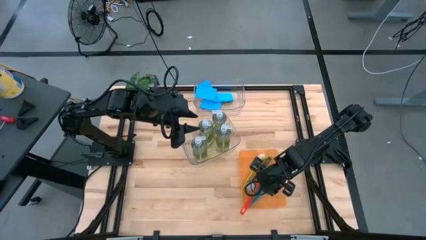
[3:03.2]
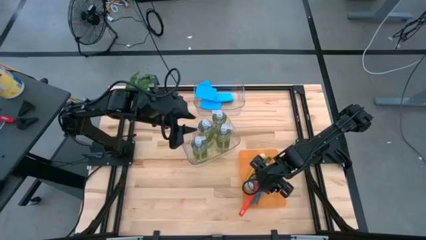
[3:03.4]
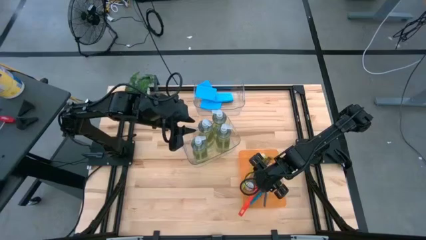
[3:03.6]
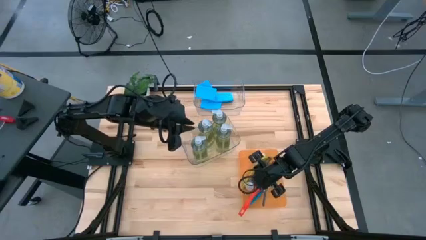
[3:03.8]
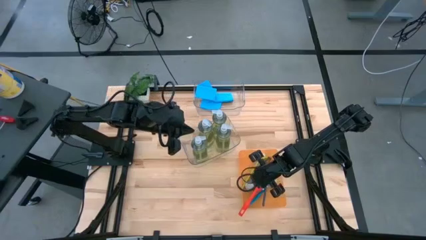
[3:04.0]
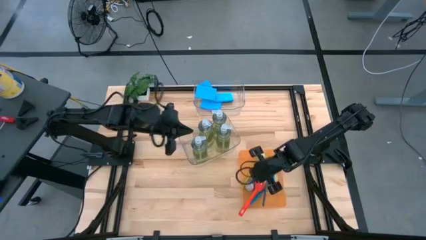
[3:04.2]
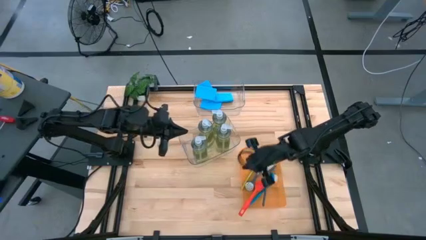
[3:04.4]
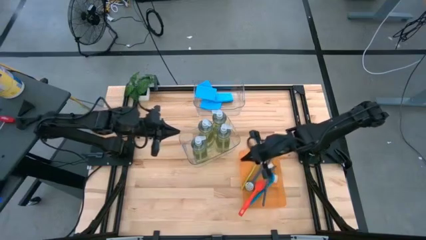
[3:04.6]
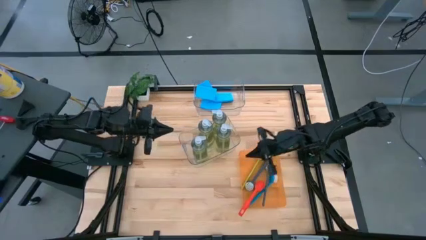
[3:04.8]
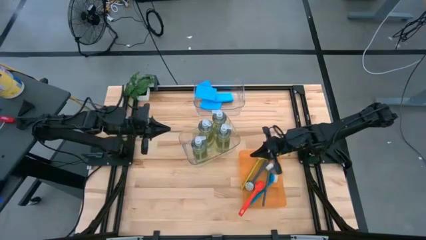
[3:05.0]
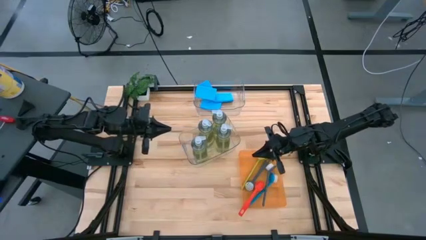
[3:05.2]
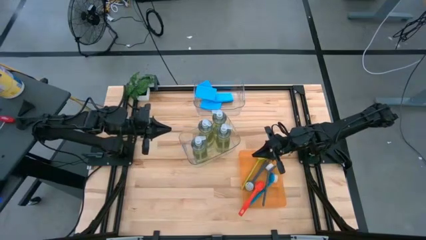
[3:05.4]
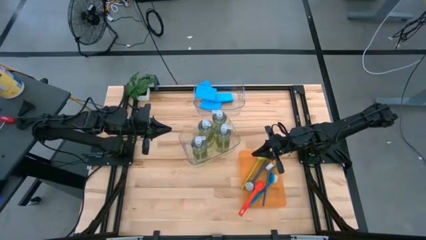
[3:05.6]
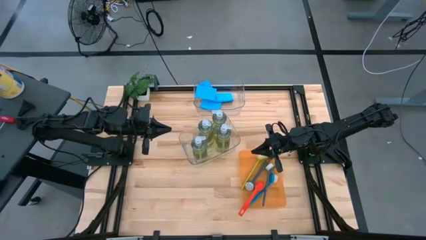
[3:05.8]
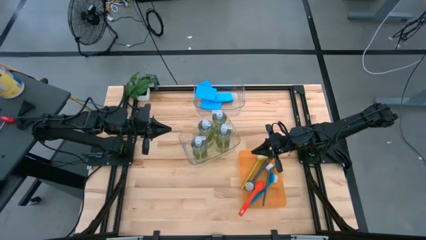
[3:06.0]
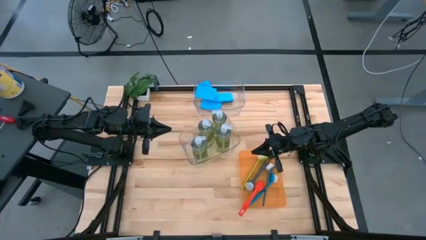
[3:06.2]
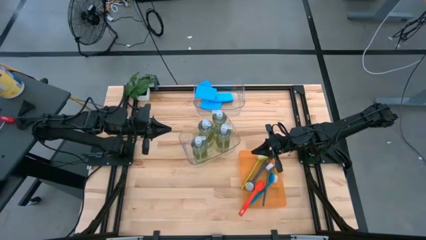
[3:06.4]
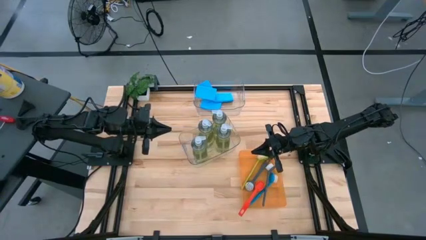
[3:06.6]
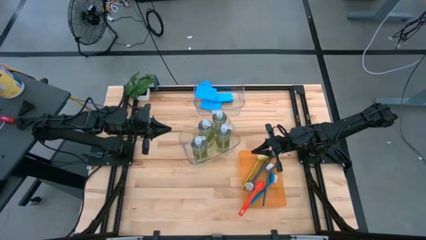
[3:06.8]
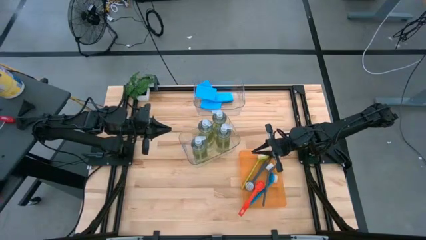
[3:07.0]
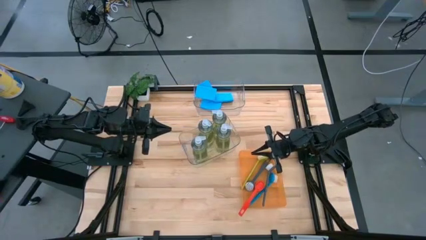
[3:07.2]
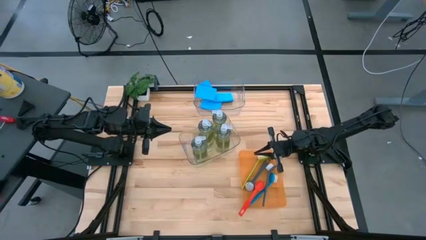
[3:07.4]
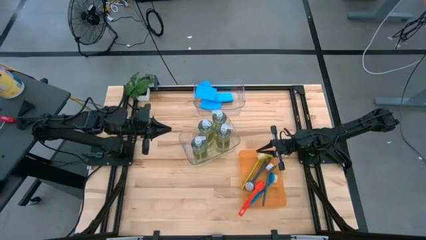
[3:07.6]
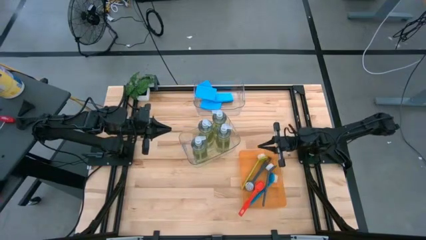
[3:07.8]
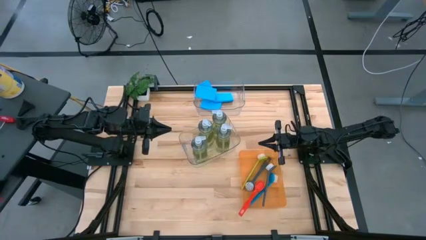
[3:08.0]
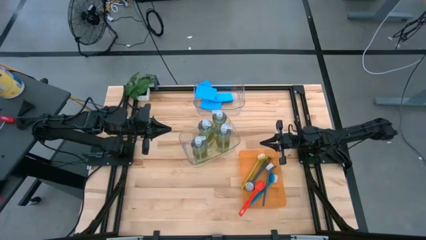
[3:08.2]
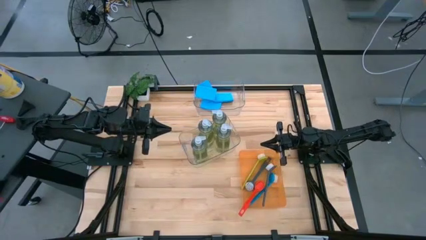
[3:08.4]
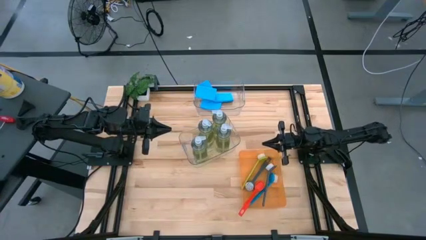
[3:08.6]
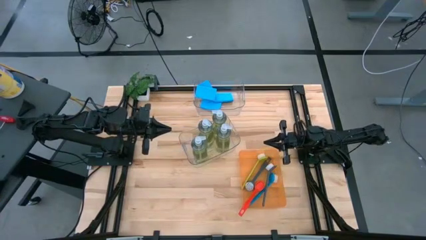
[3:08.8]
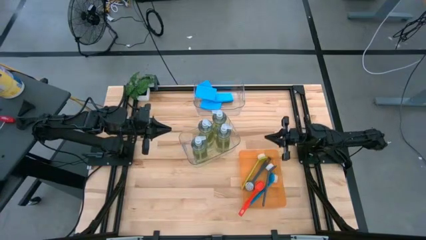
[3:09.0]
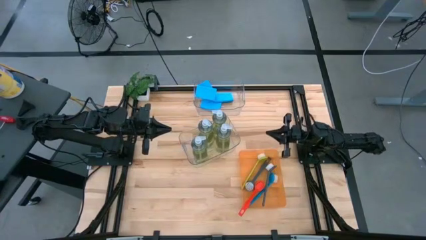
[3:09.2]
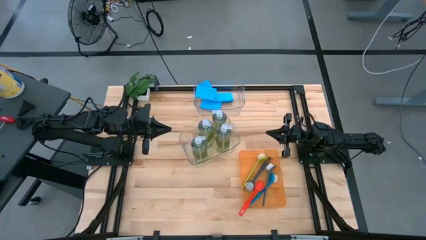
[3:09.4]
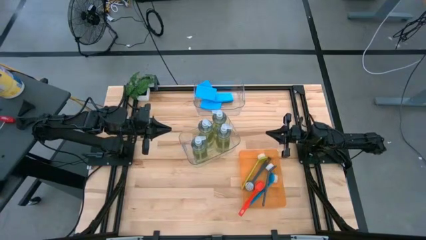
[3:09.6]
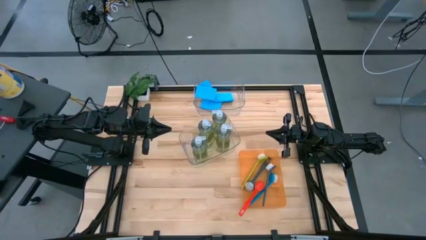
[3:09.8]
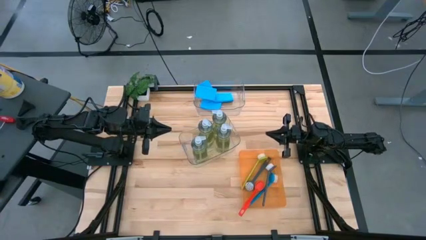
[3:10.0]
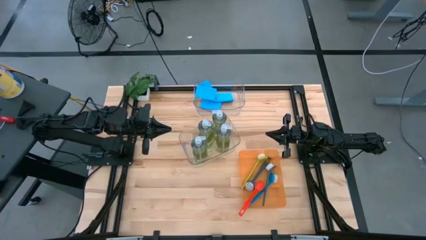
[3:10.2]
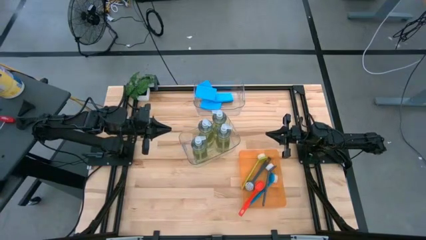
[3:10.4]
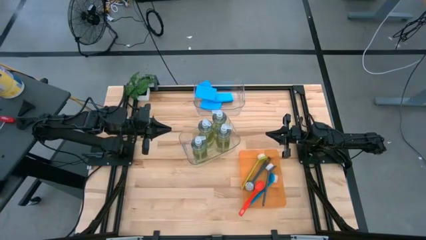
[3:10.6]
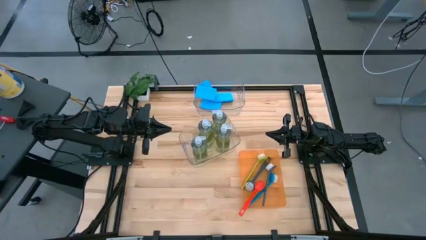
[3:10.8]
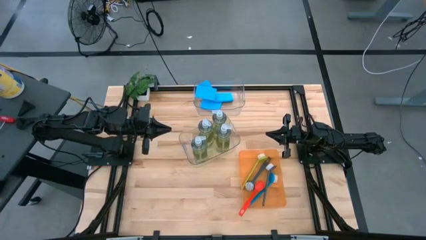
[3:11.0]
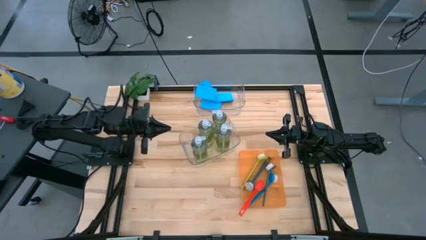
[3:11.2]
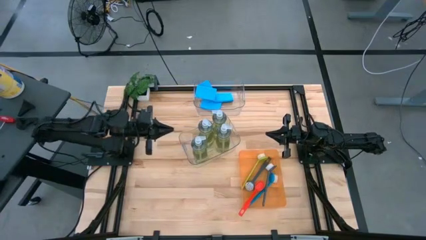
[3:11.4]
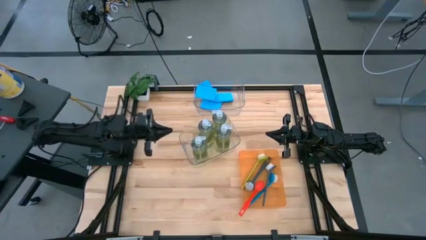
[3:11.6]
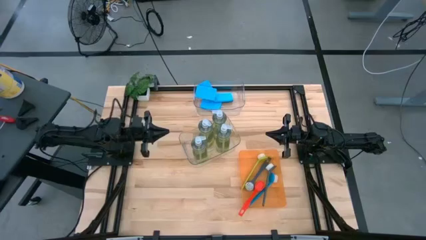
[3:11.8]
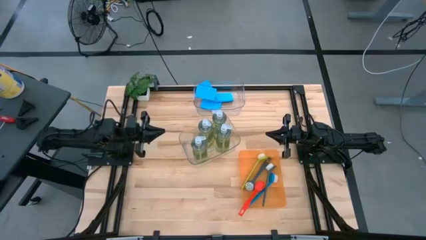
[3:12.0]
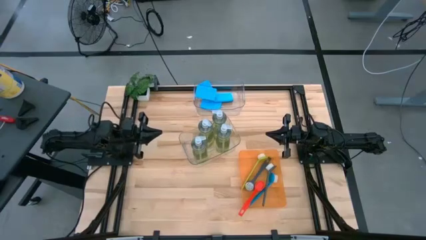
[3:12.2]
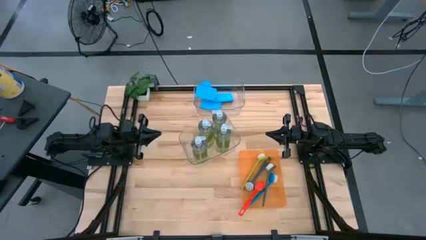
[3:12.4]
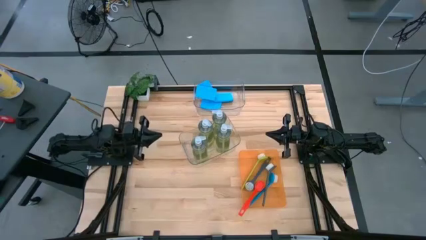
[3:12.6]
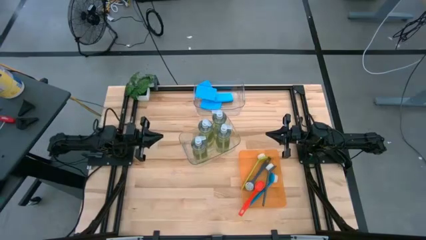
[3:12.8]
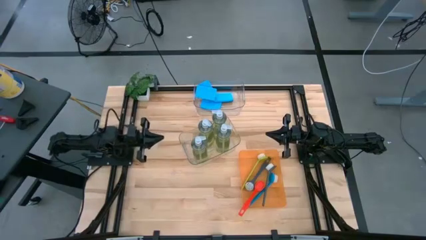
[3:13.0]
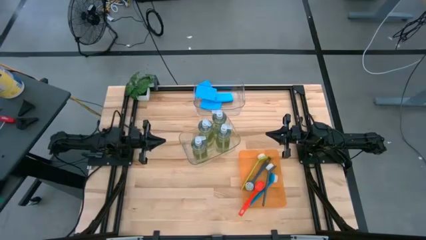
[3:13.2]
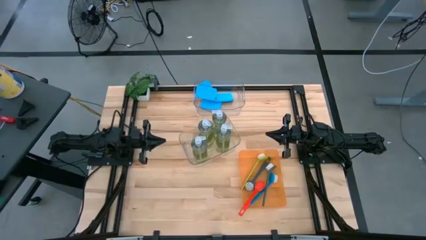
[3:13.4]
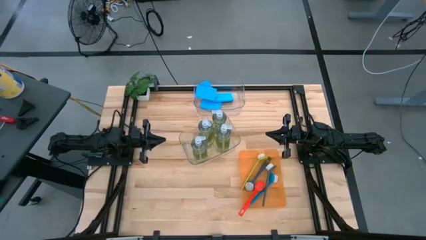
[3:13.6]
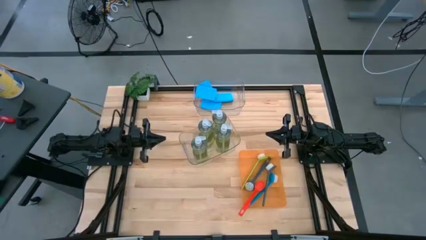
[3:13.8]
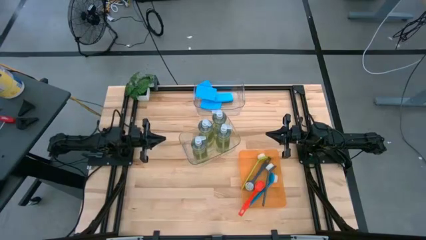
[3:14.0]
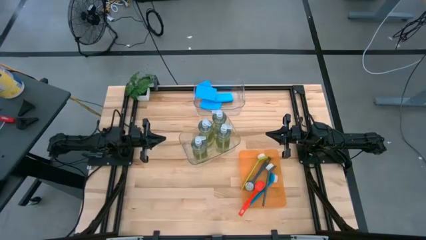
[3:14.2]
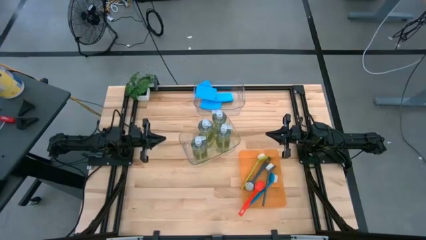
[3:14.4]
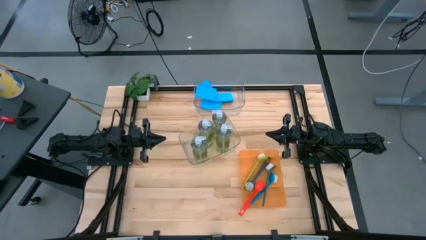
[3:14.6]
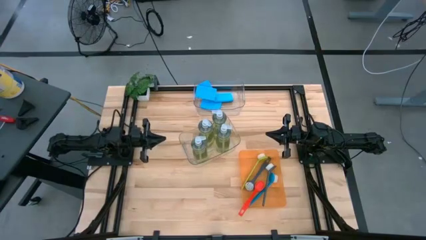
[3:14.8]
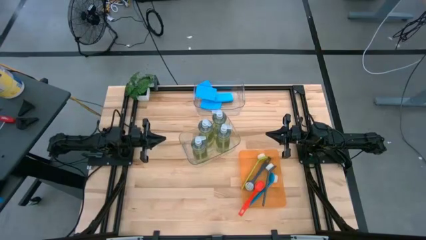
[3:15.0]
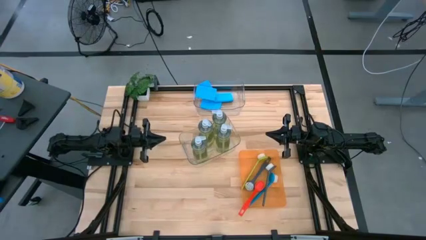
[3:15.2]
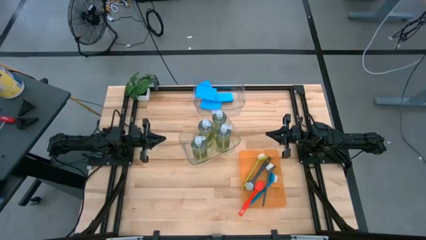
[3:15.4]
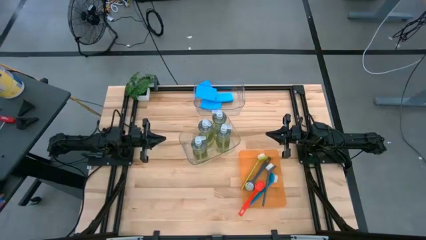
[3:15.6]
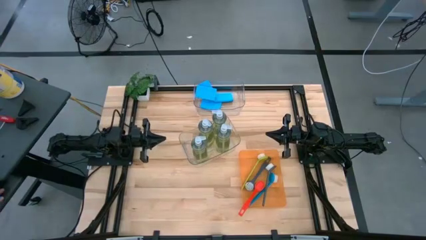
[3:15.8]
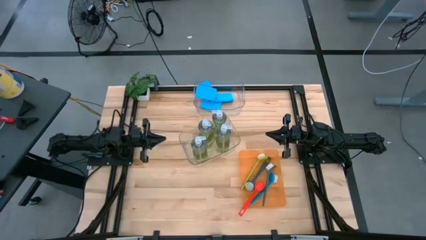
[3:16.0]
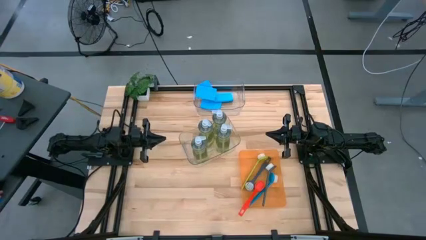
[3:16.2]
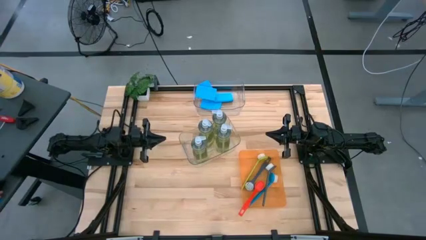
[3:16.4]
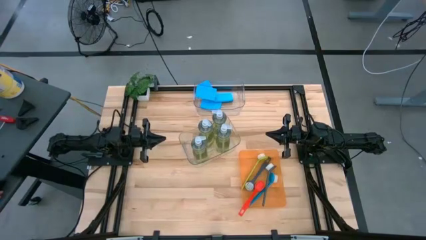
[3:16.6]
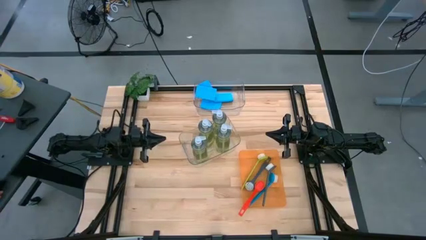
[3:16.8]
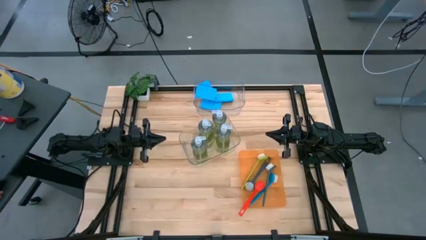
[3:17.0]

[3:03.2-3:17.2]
Task: Pick & Place Kitchen Sink Supplies
Return to Home Position
